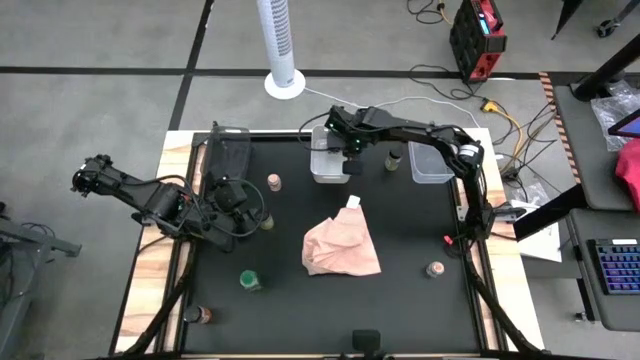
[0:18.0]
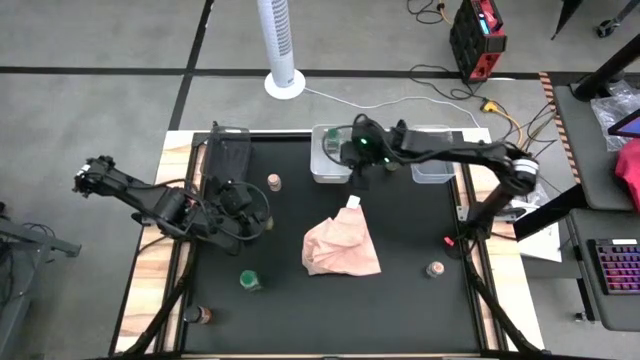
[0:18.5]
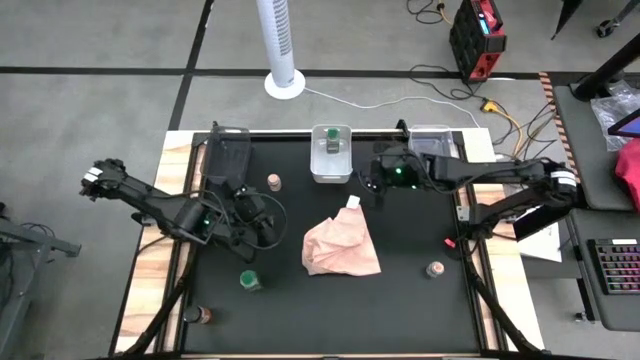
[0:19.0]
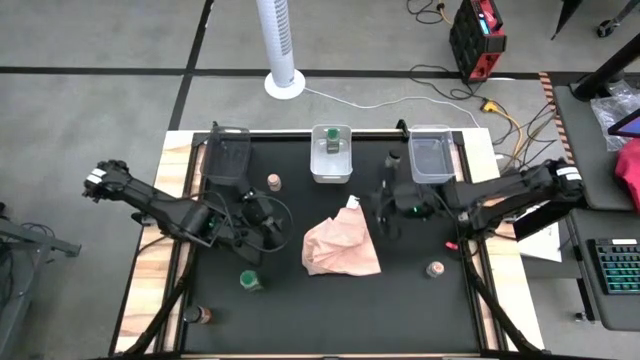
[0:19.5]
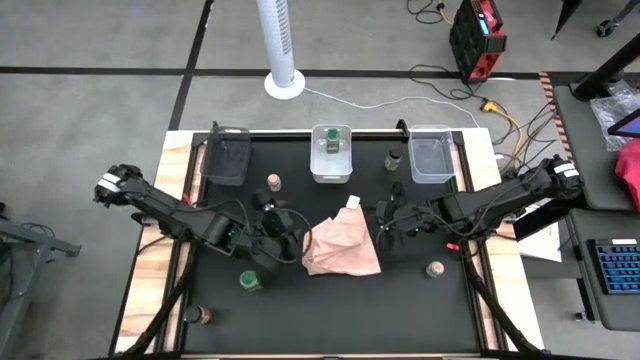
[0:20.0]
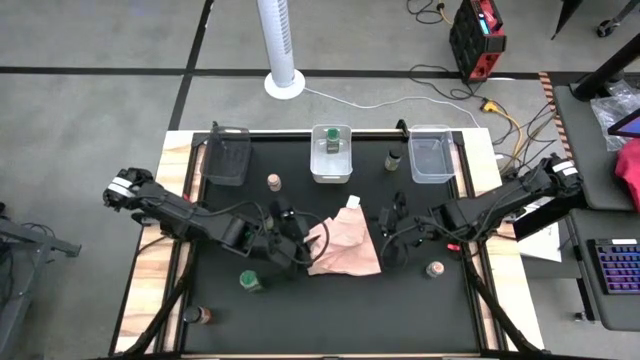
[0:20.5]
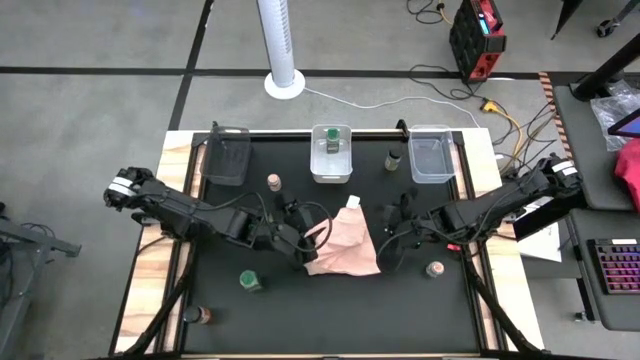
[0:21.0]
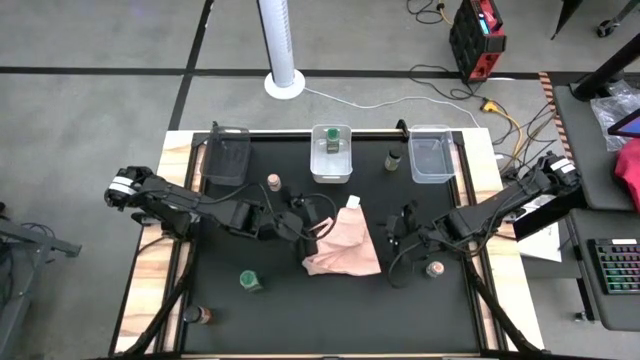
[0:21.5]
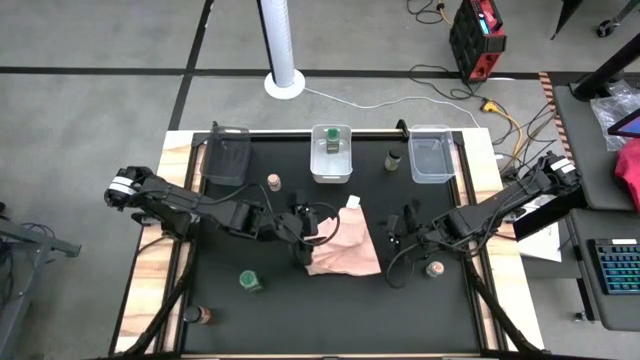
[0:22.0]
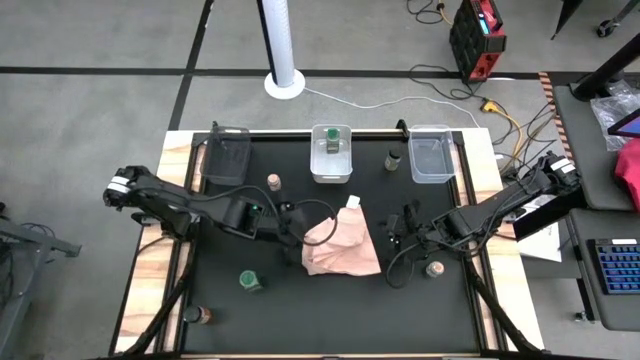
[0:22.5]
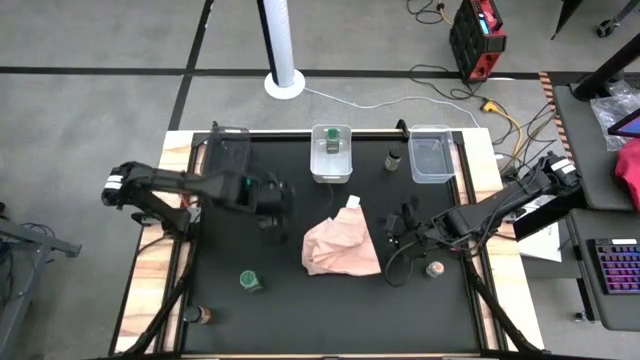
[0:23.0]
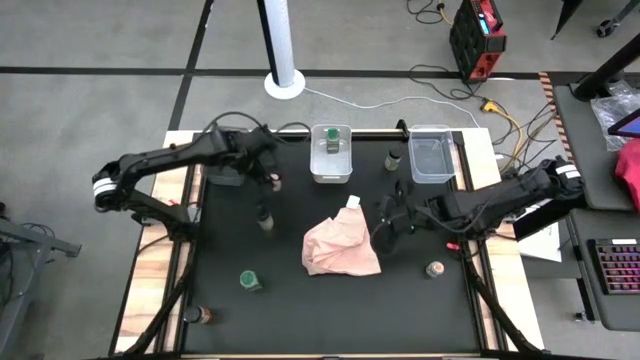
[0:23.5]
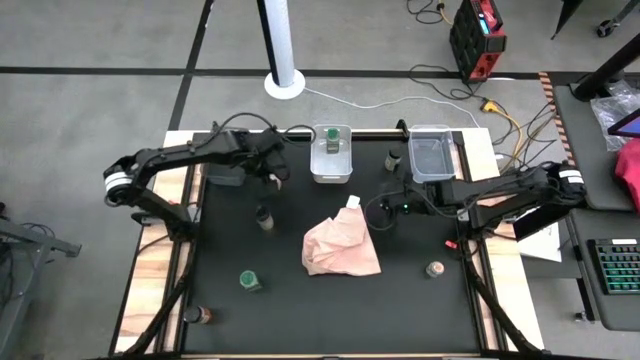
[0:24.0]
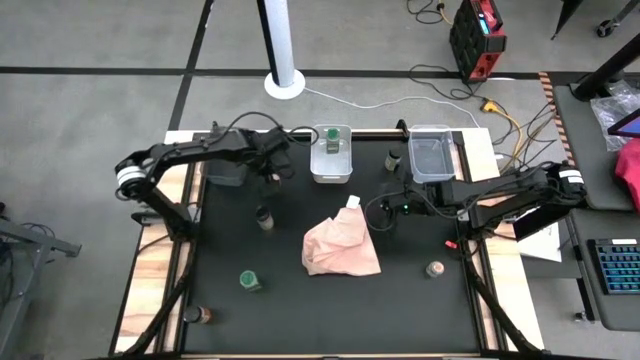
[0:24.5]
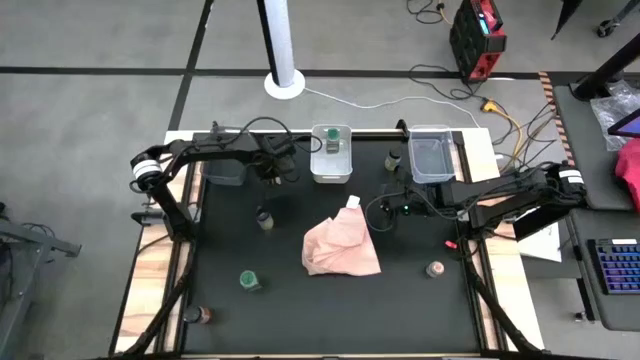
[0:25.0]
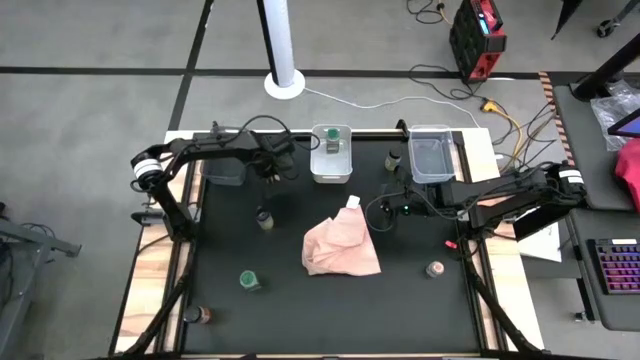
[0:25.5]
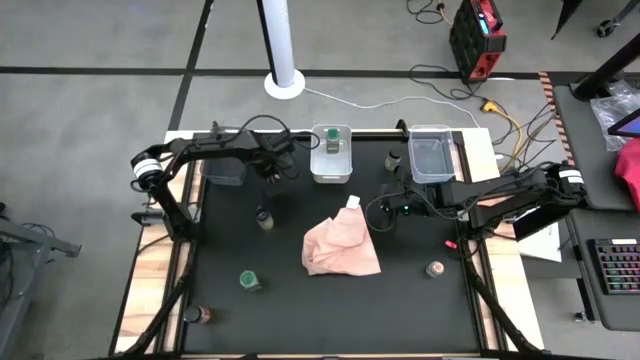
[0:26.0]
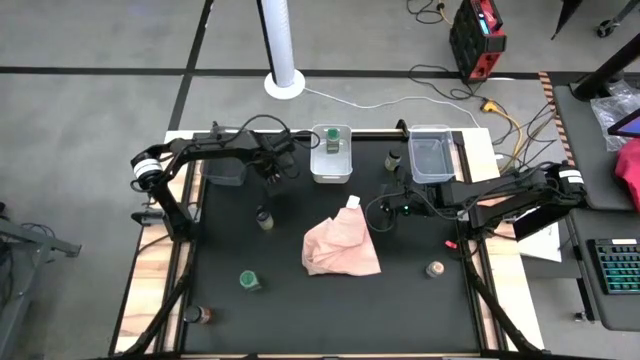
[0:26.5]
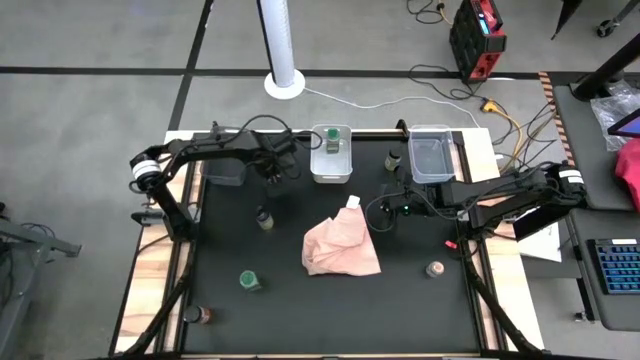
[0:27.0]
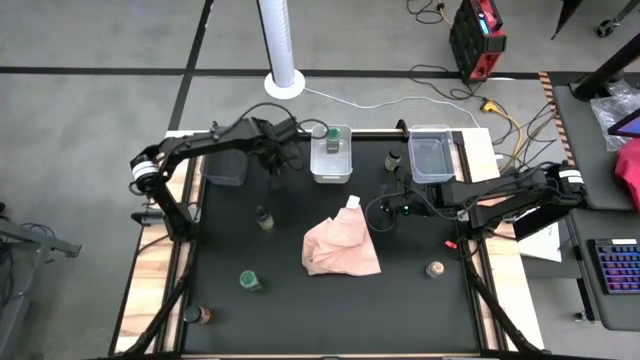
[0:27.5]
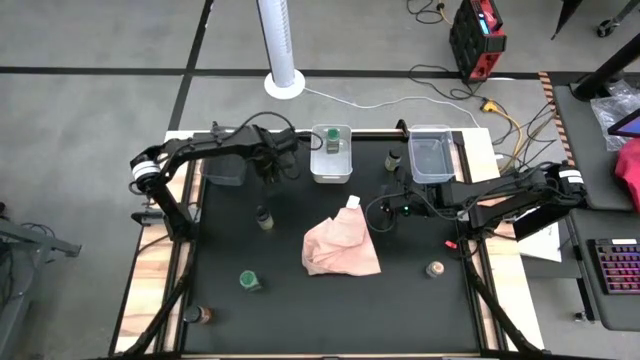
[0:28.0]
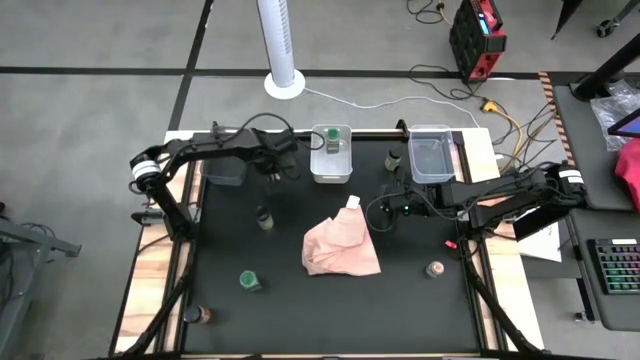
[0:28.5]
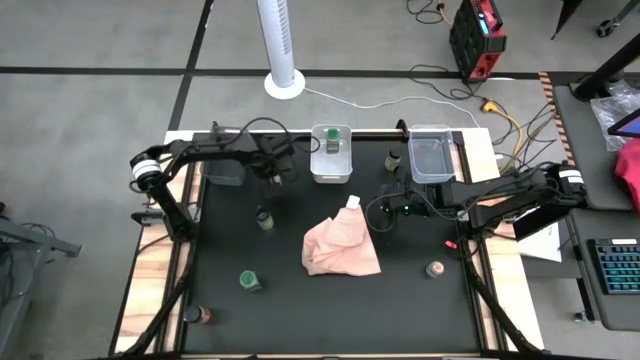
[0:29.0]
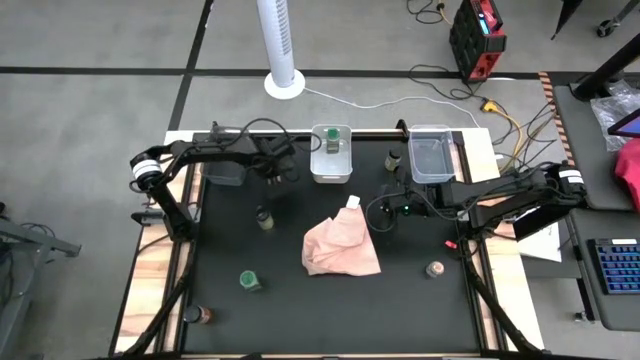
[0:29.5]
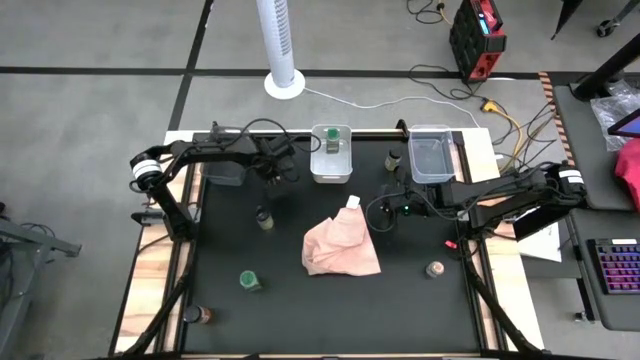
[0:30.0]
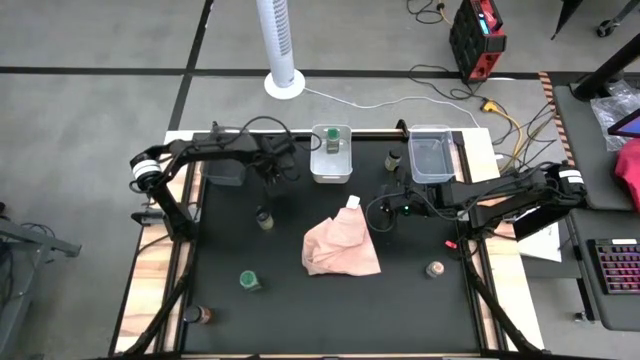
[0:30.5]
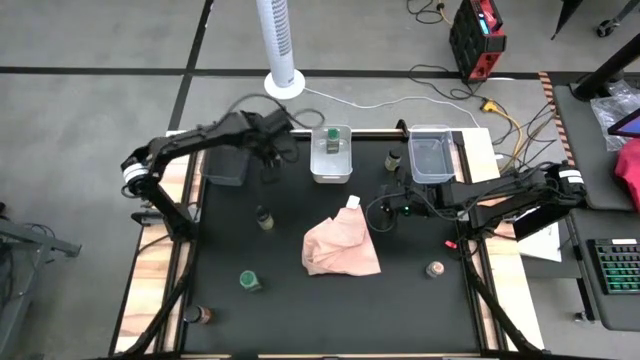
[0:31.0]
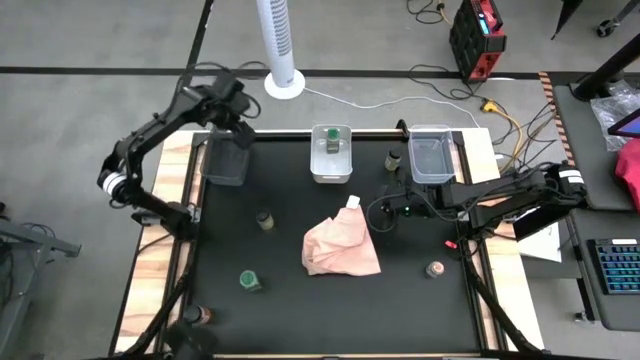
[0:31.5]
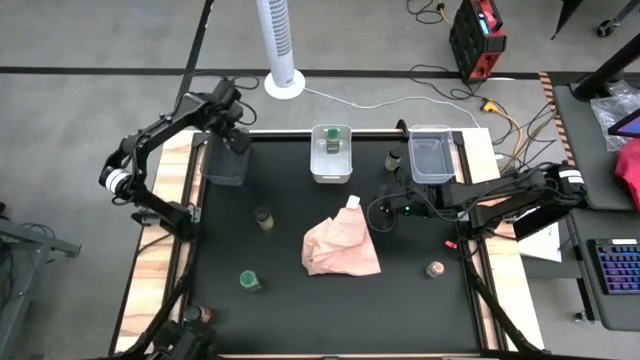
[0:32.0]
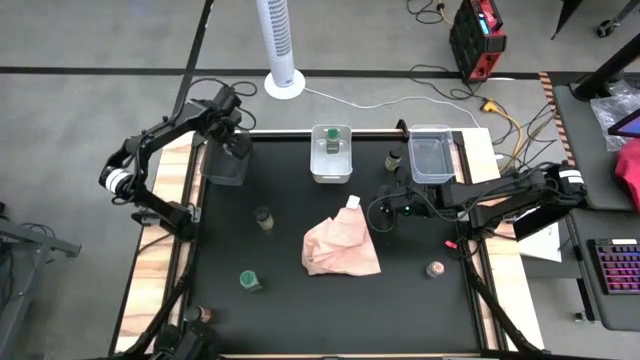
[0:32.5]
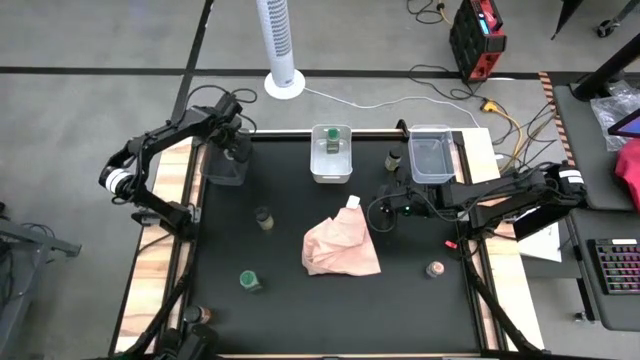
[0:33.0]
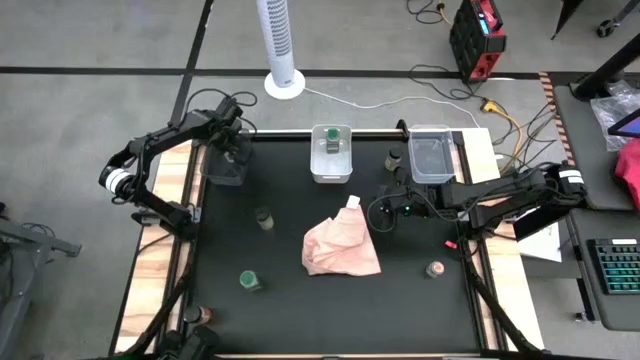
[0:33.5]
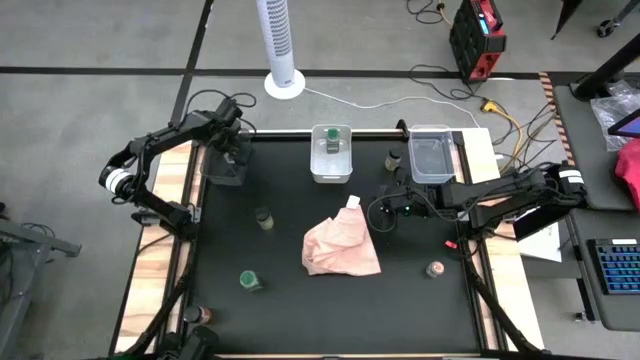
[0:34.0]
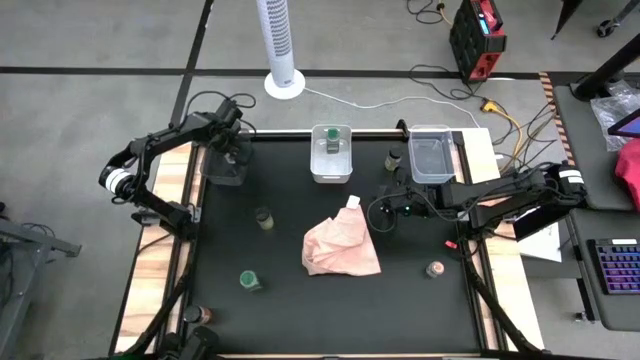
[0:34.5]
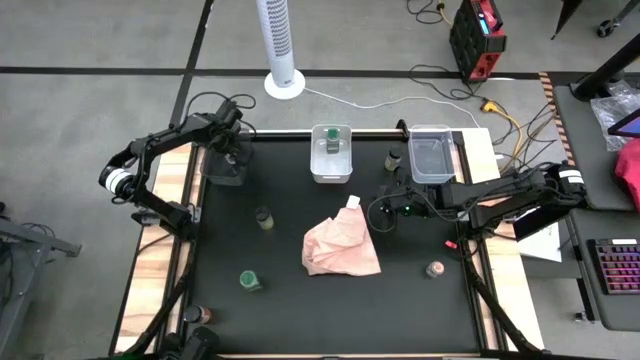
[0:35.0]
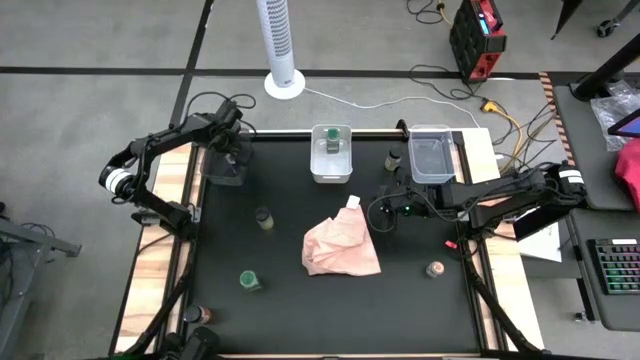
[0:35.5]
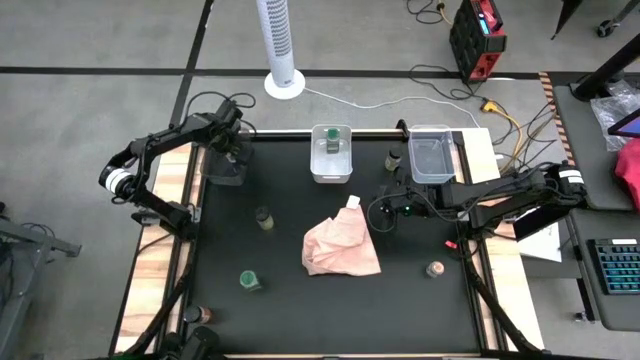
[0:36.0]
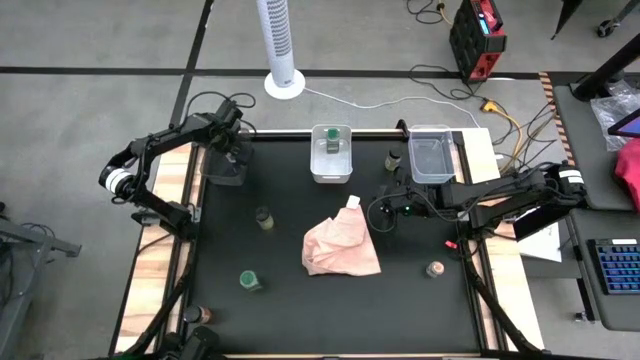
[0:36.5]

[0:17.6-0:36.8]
Task: Sort spices by type
Put the left brown spice bottle into the black bin
